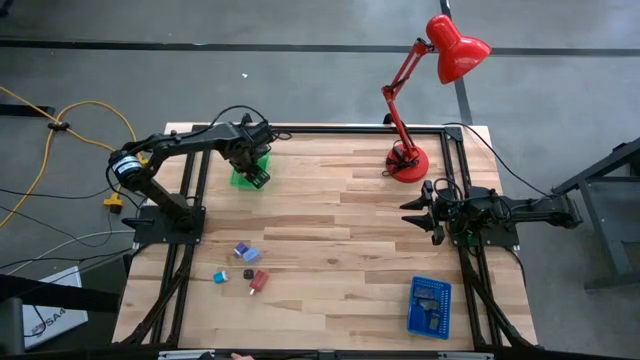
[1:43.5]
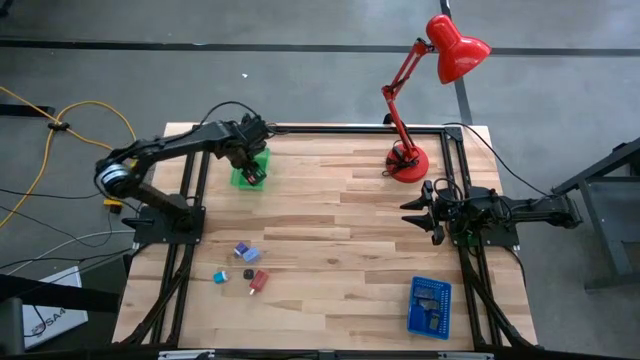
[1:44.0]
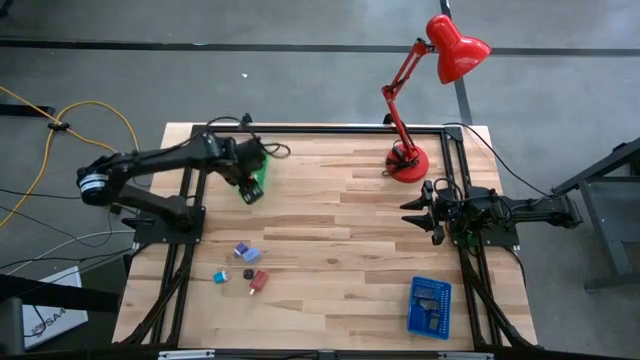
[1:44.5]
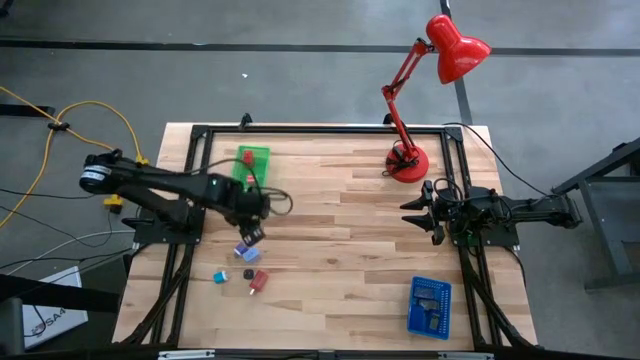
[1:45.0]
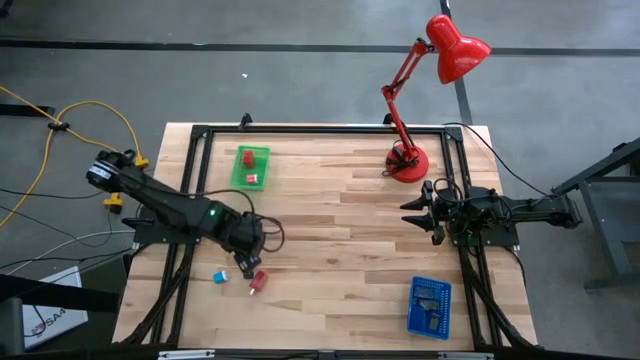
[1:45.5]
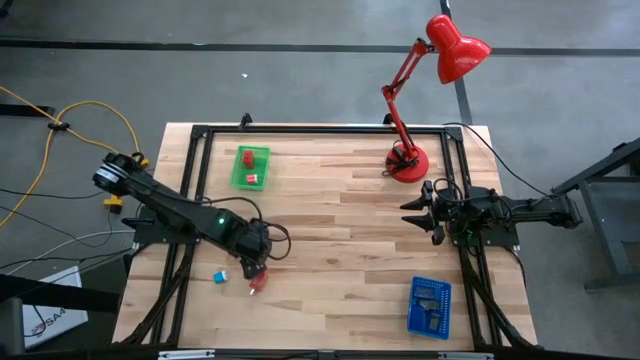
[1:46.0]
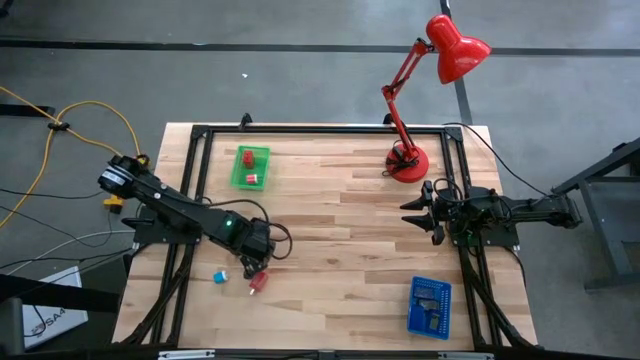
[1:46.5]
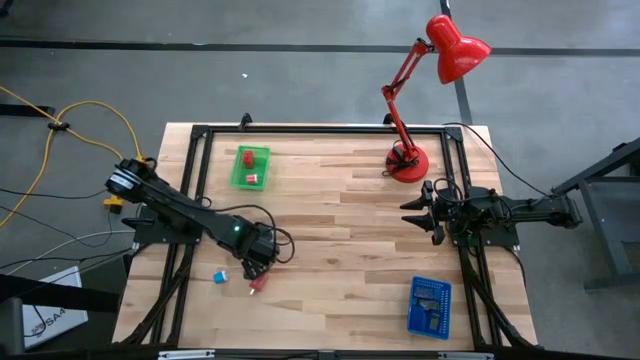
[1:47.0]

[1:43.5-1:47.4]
Task: Pick & Place Office items
Put the light blue charger adapter into the green bin

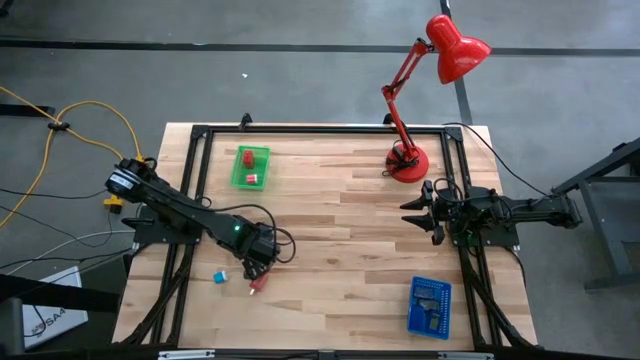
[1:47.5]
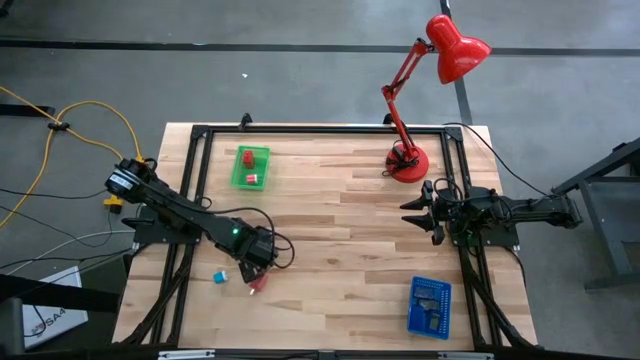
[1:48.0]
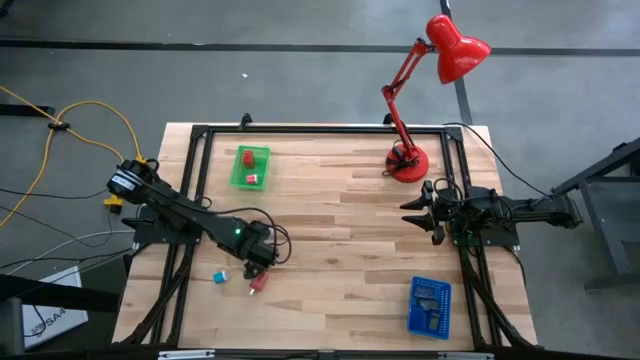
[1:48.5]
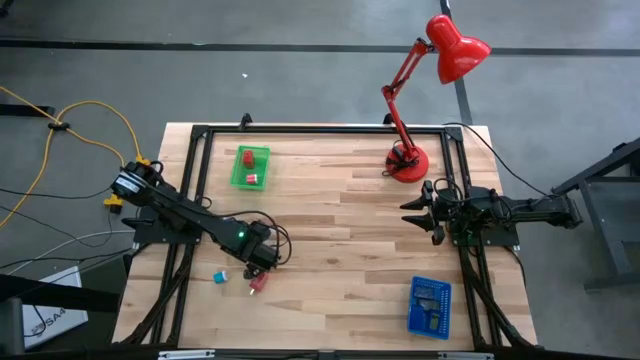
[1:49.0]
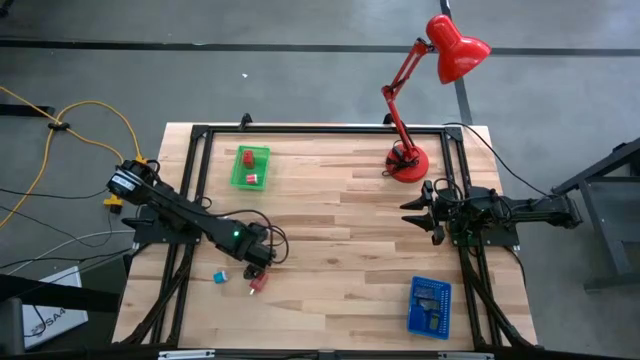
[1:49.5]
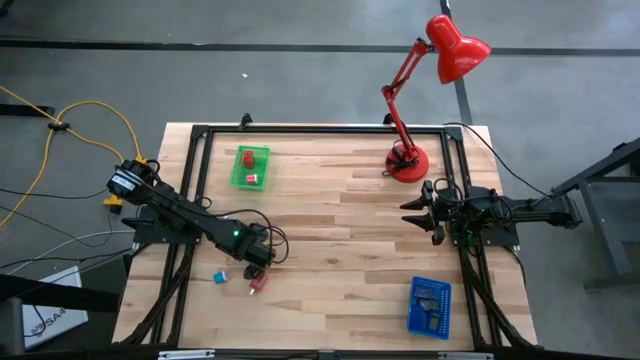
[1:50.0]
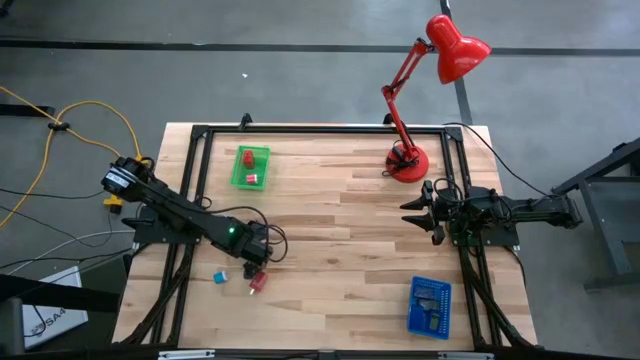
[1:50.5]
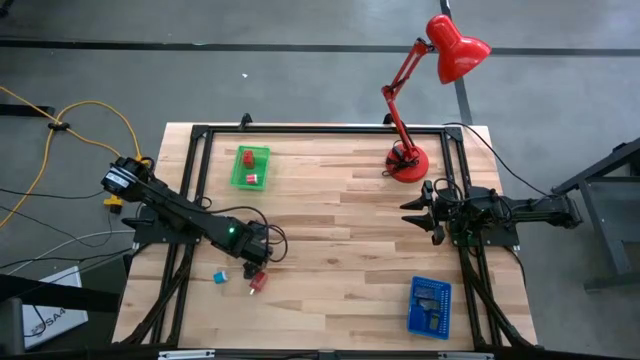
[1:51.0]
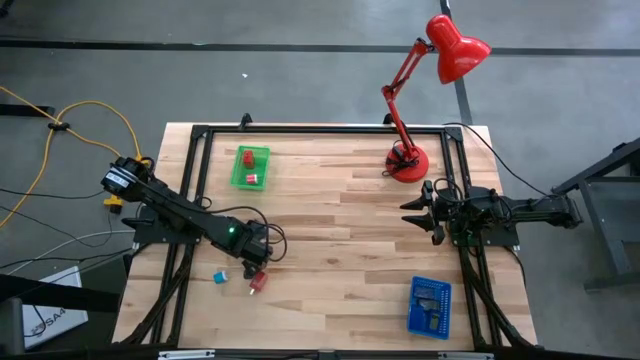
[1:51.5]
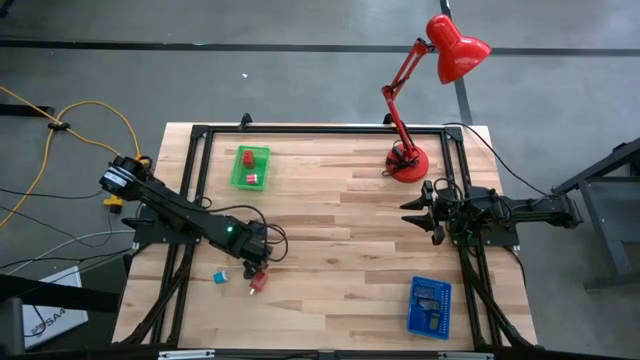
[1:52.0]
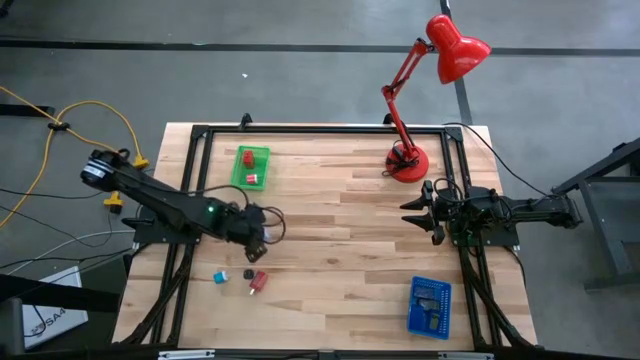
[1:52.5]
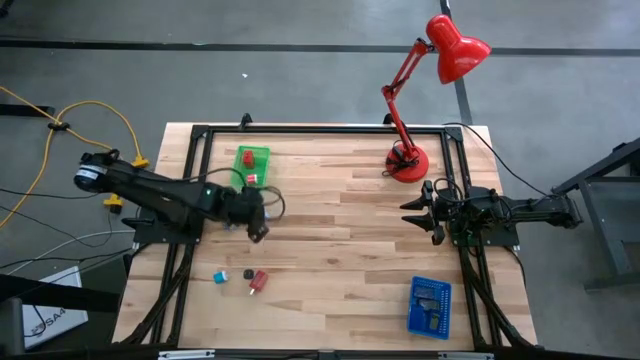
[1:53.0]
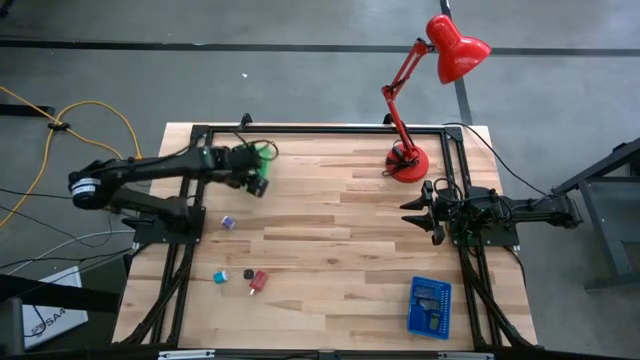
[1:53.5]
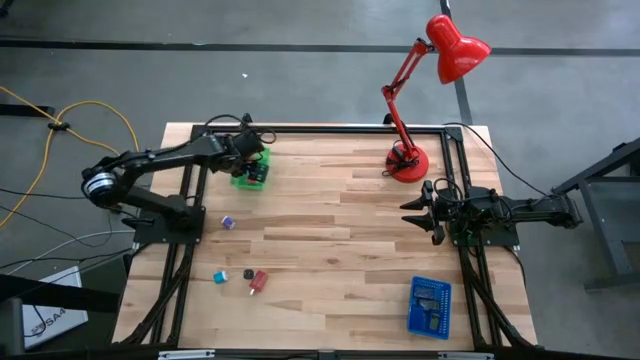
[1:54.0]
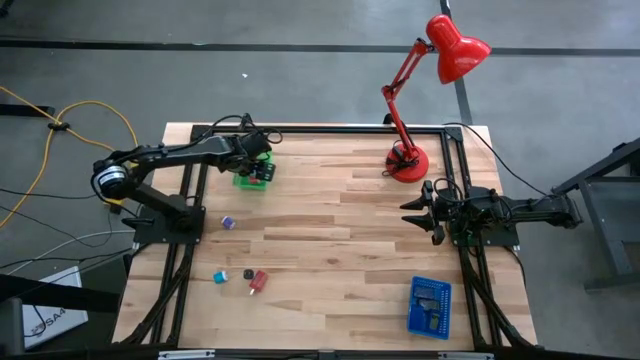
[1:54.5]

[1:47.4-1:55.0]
Put the light blue charger adapter into the green bin

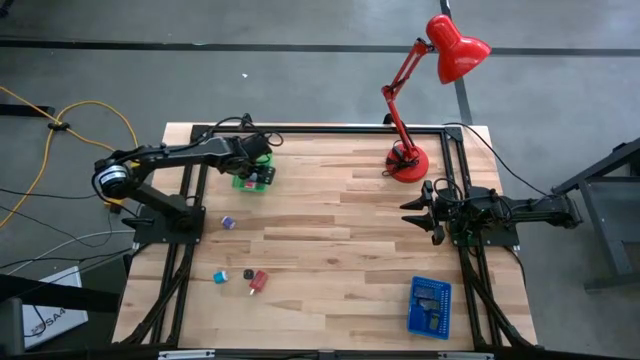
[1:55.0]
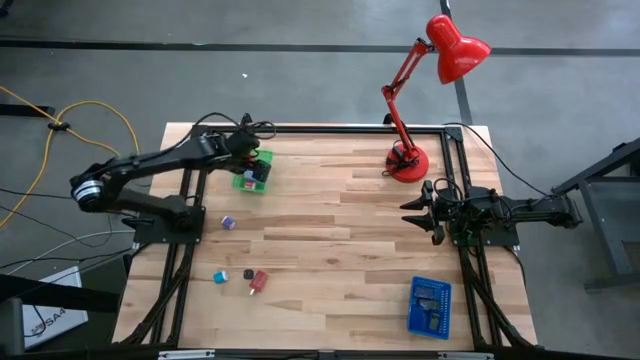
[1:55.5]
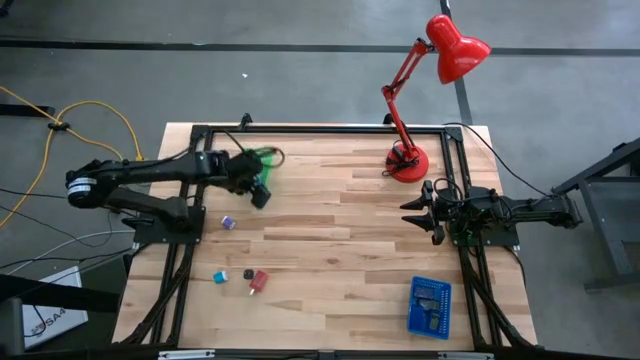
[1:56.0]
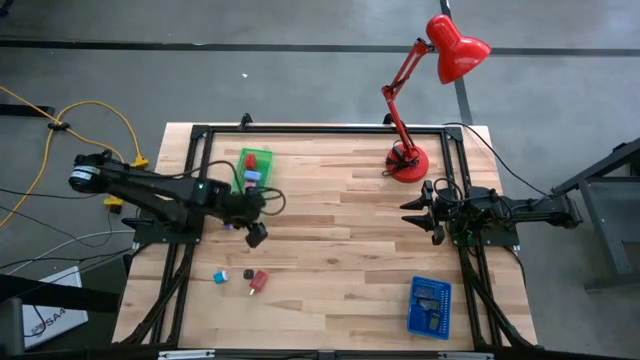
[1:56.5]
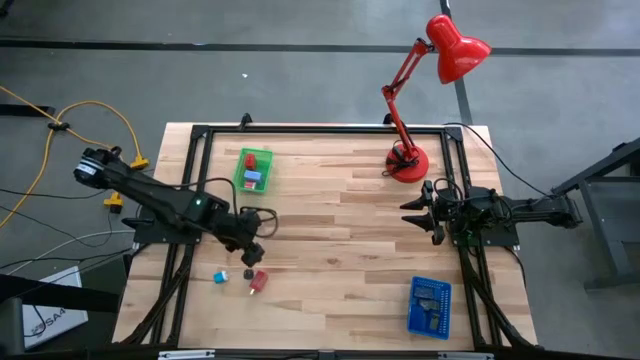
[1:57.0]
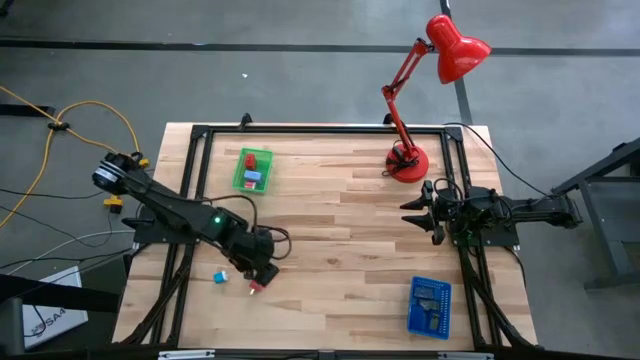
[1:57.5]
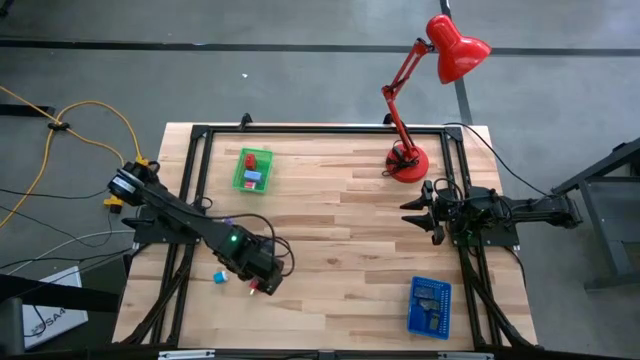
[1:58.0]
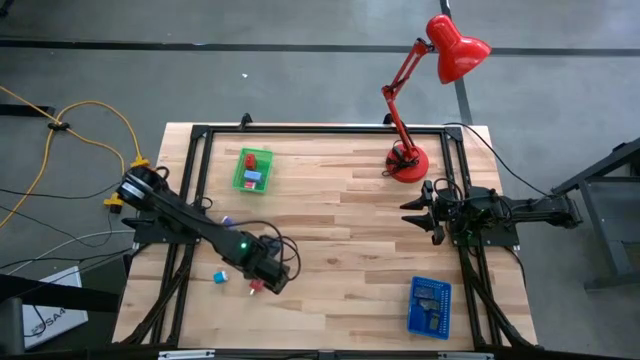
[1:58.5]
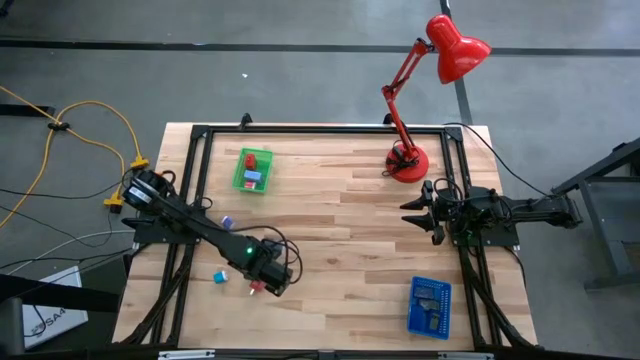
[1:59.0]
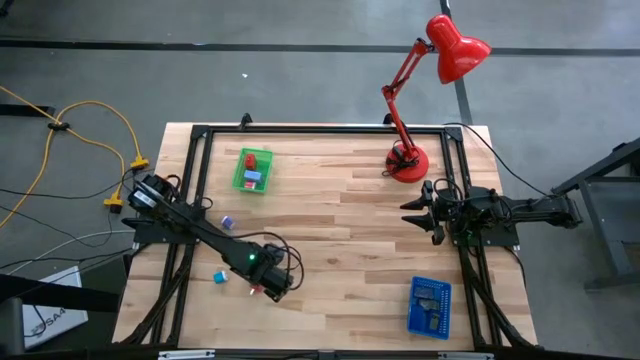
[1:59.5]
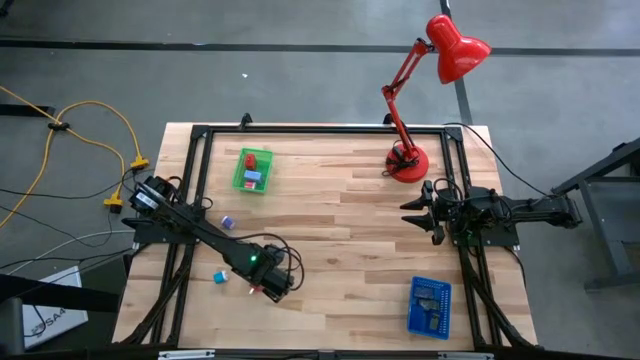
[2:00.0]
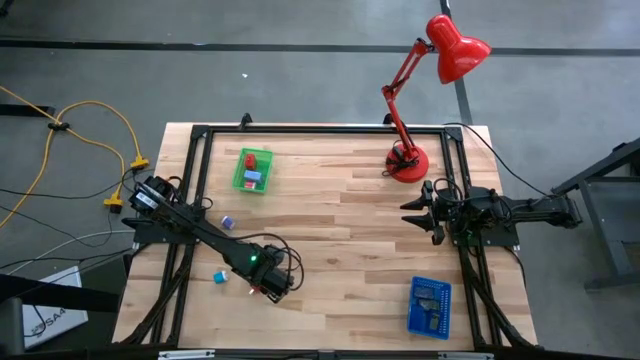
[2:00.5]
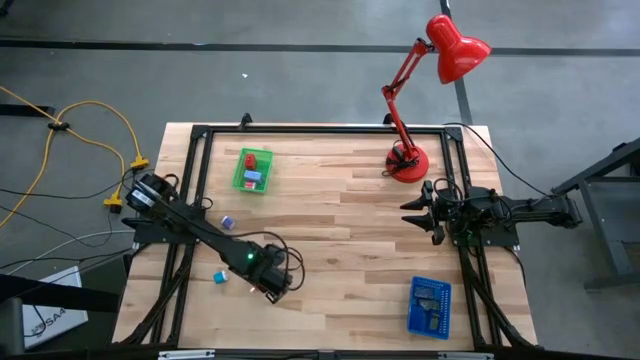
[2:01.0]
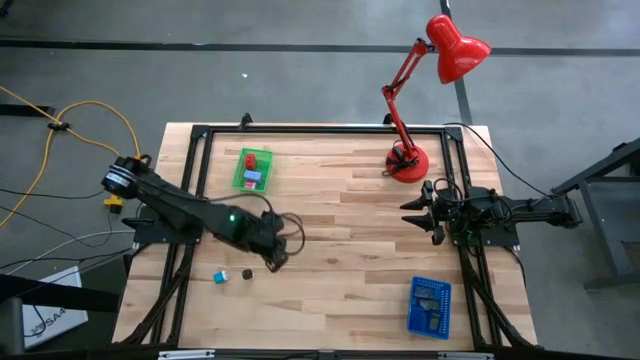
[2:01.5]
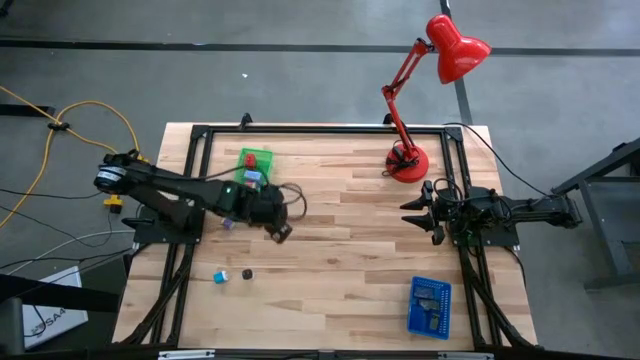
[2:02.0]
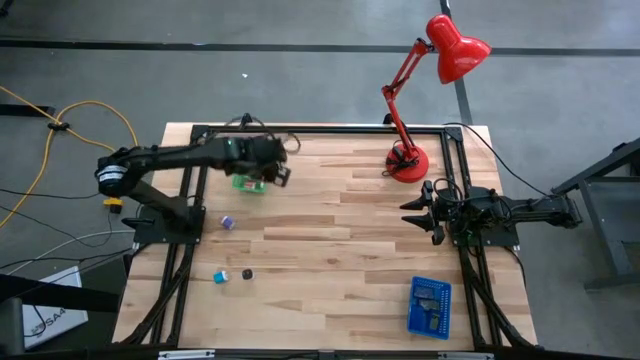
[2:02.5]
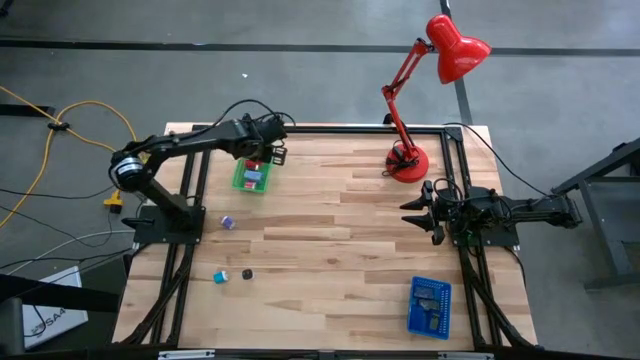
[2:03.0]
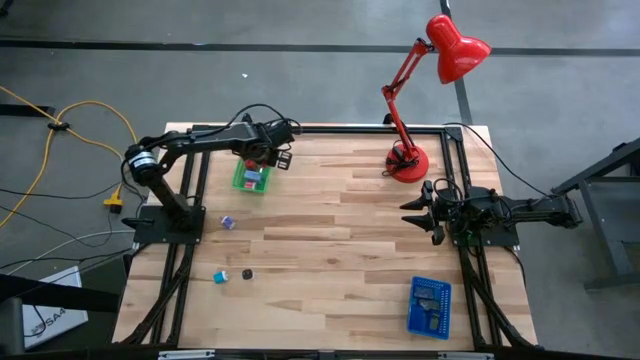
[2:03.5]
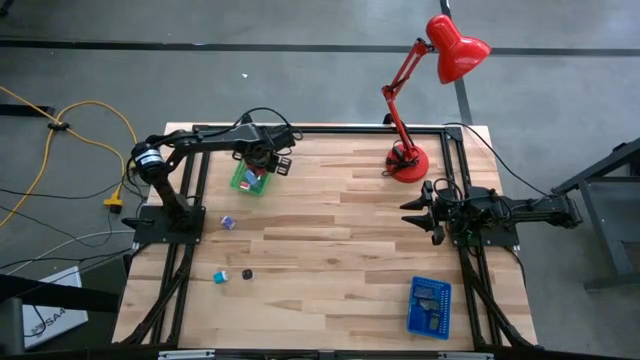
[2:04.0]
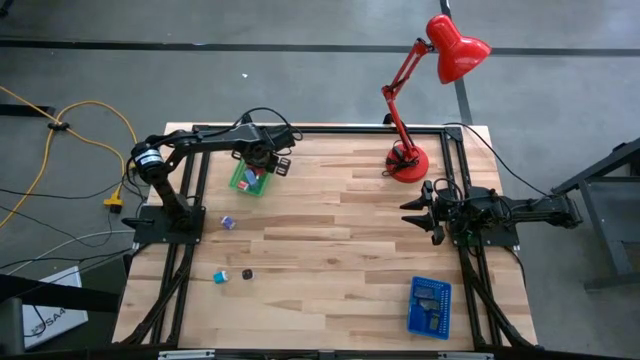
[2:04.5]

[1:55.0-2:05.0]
Put the red charger adapter into the green bin
